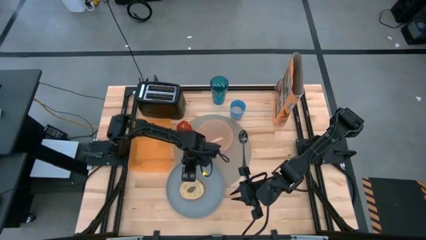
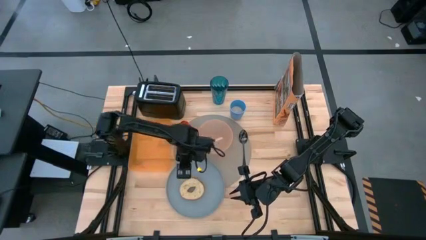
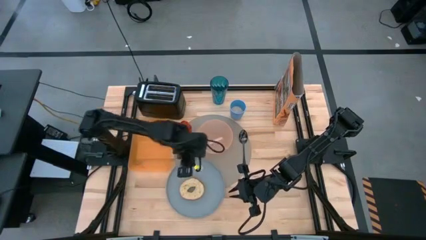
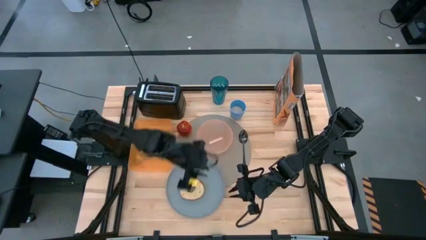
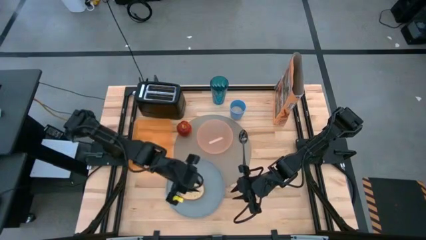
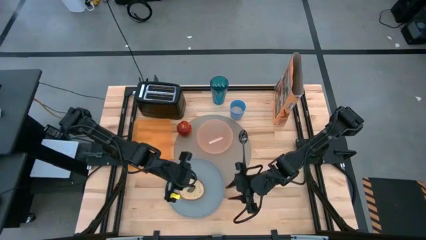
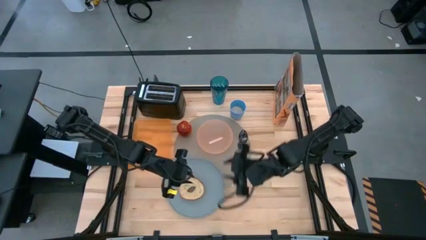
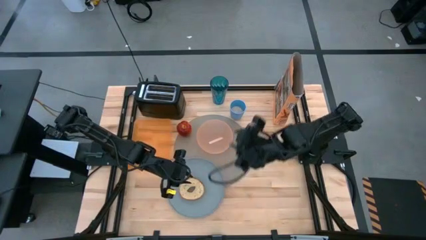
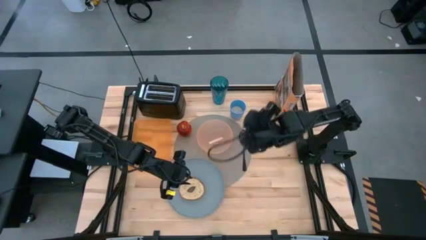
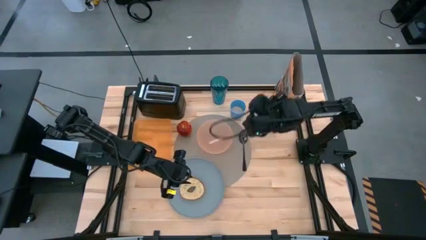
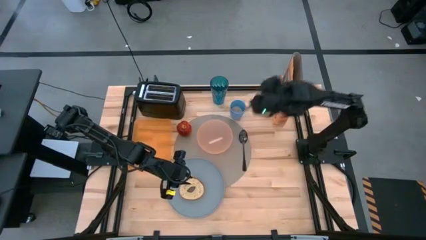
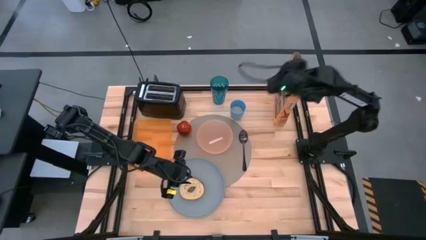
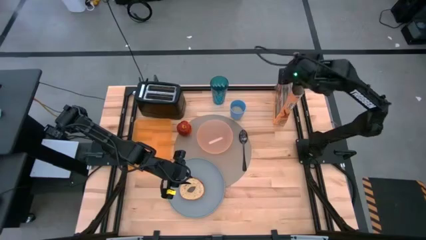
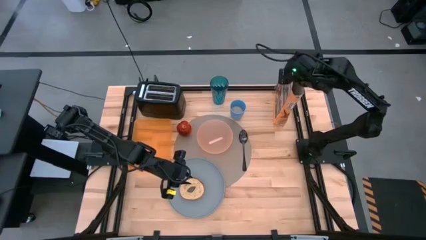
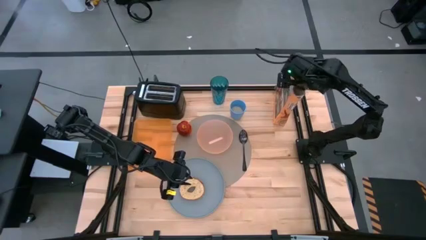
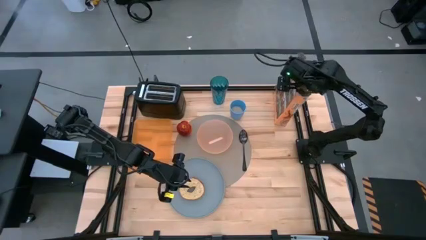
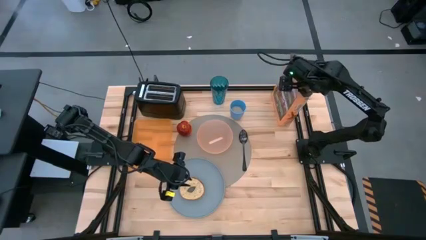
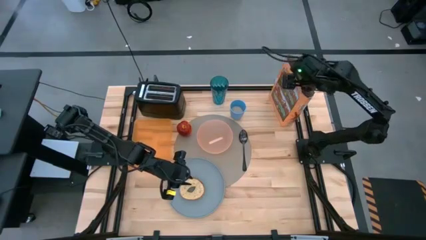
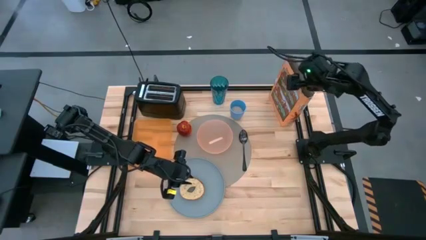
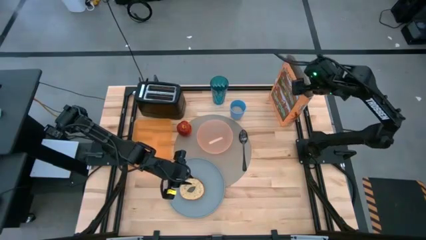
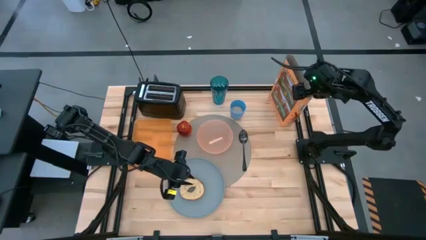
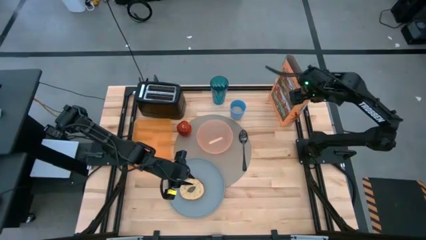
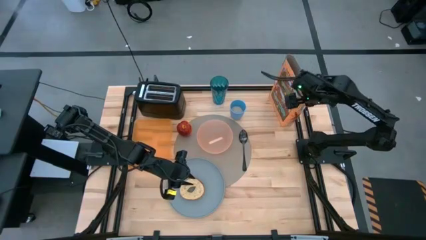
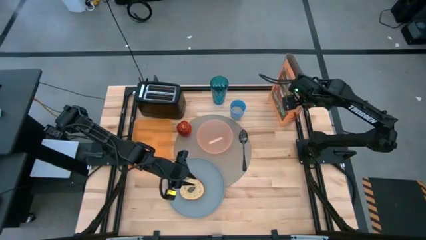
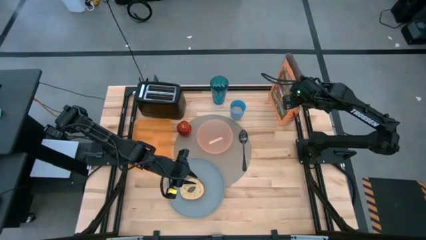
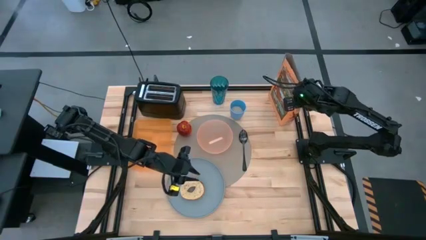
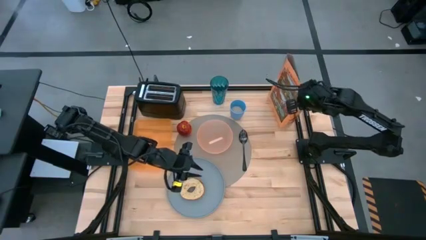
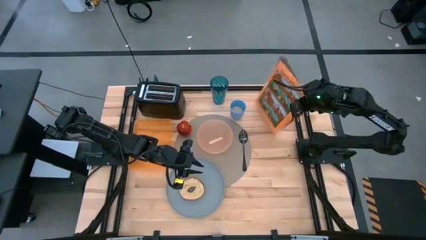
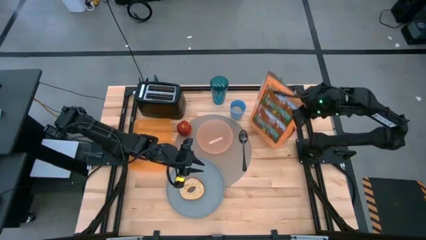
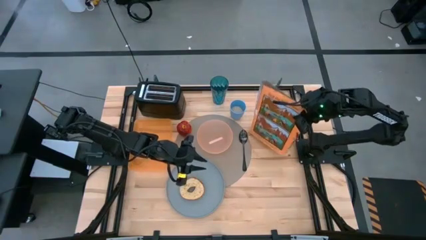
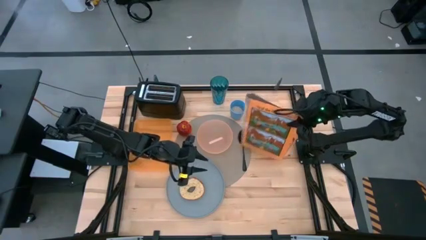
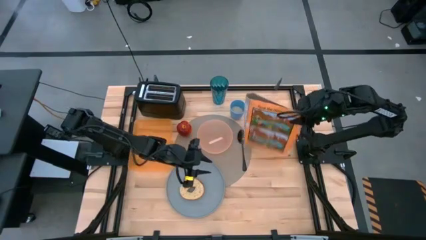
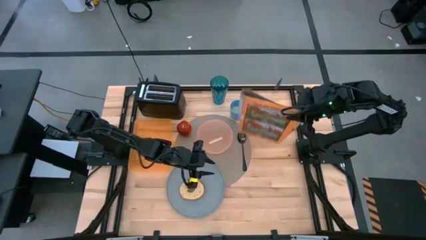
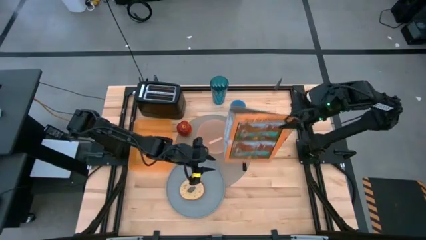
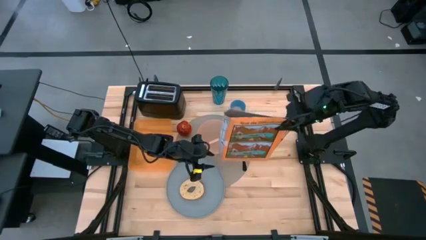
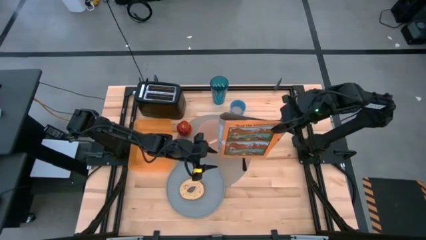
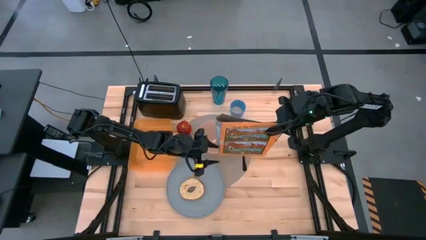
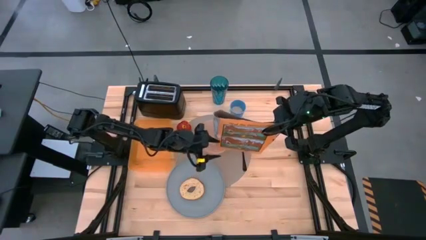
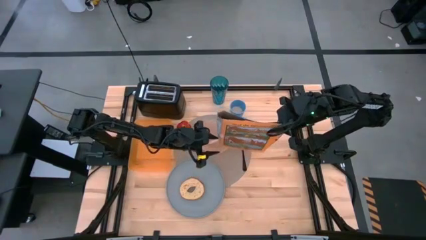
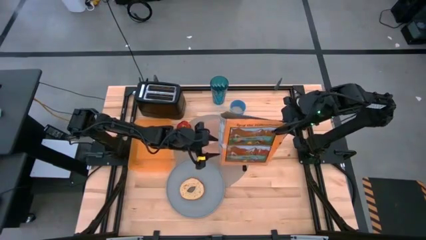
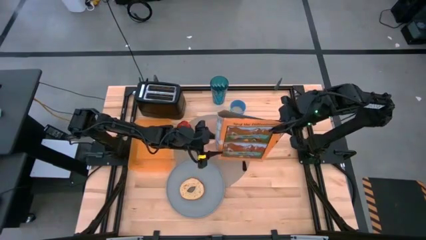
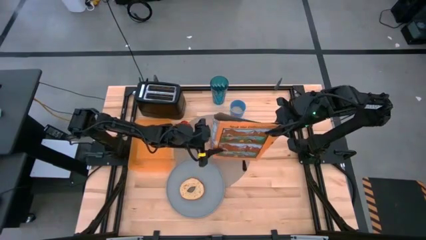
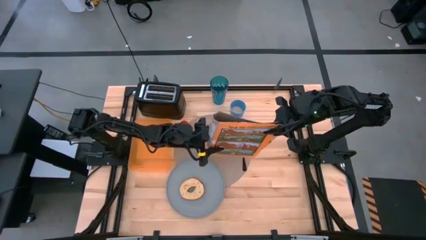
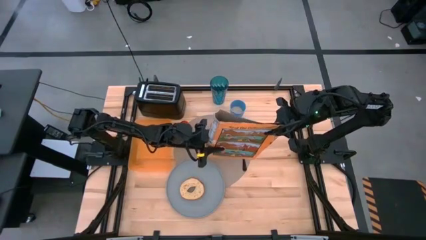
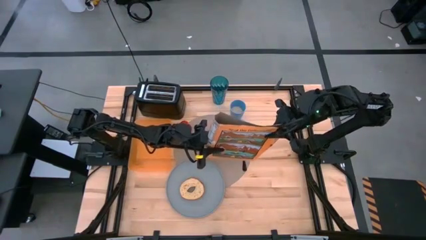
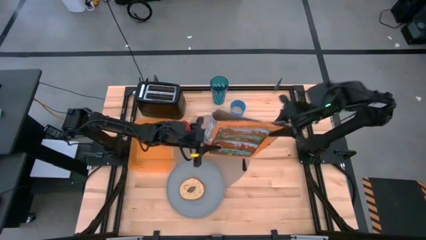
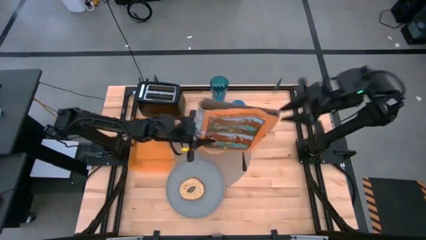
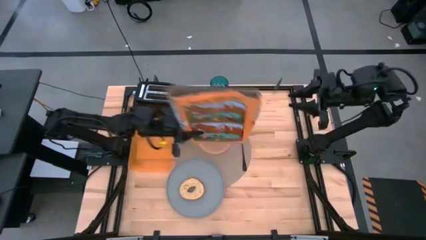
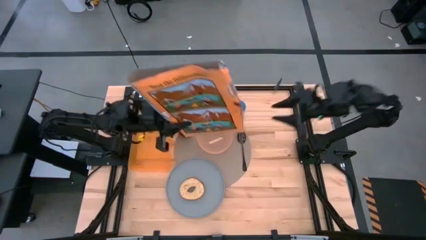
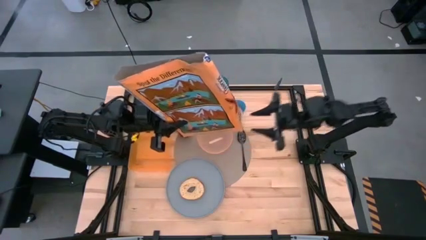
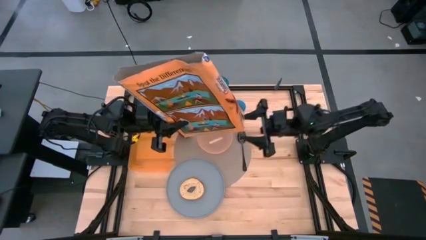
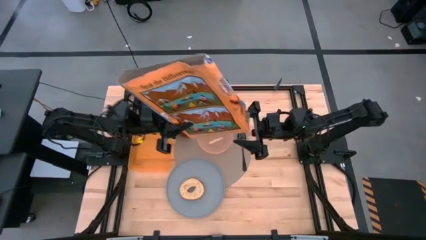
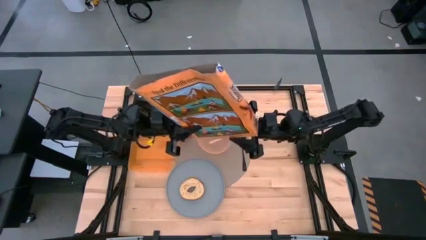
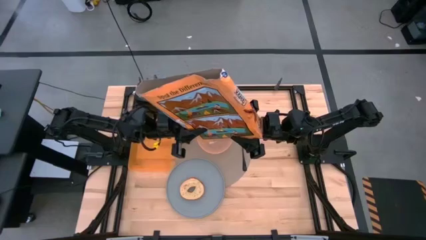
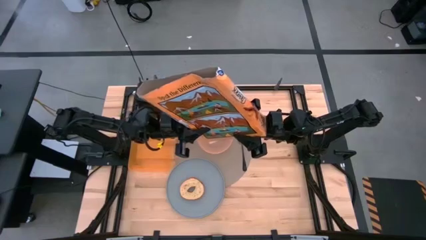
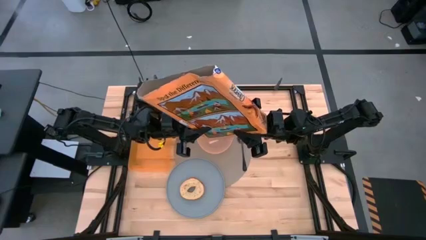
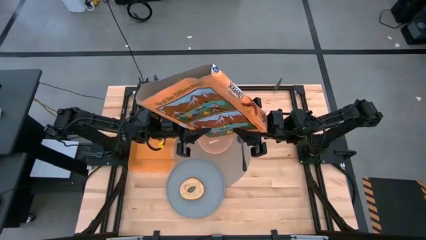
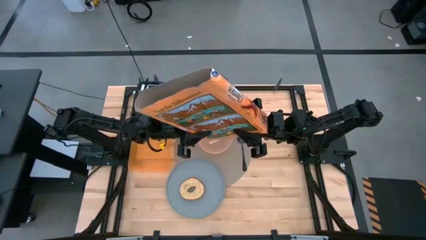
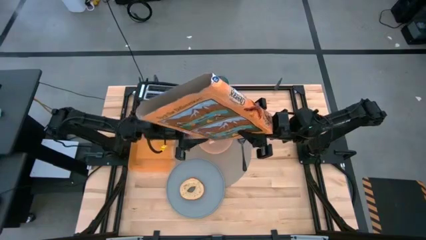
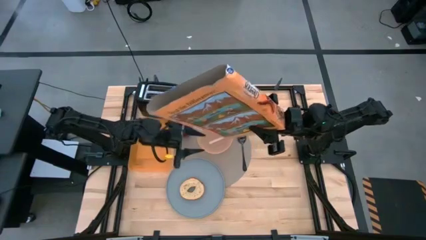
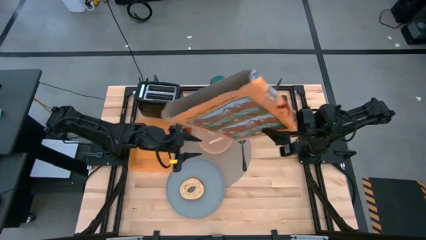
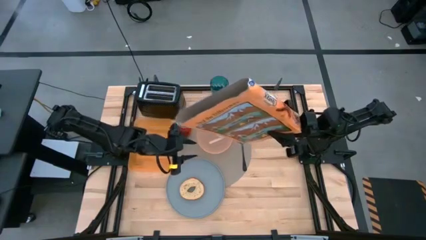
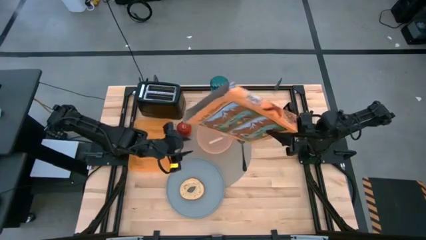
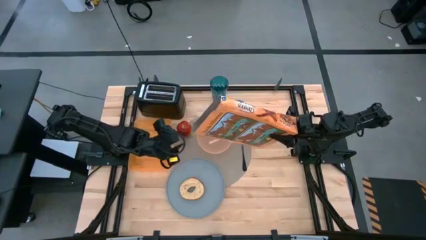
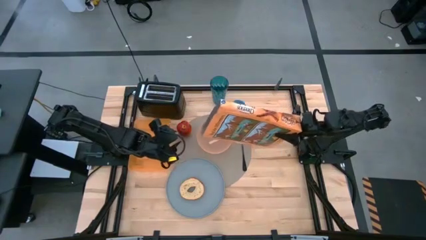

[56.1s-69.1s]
Task: Arrange a breakfast setting
Pour the cereal into the orange bowl

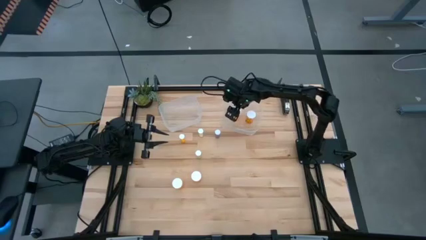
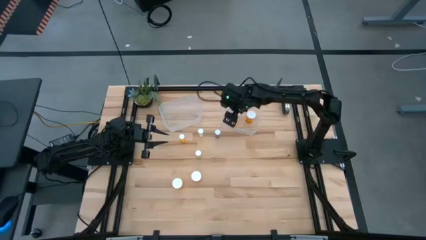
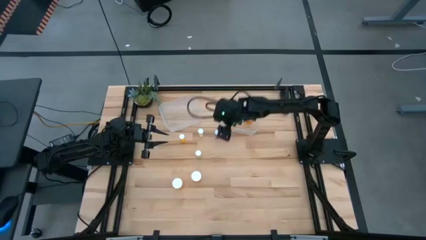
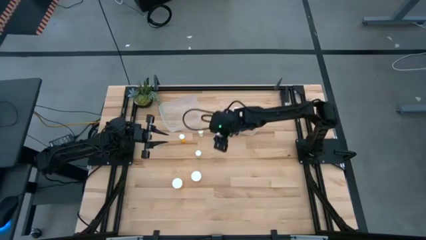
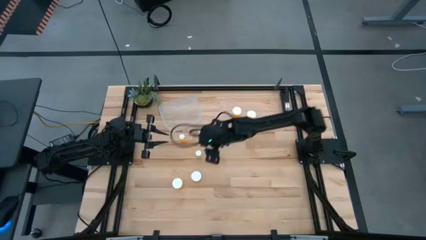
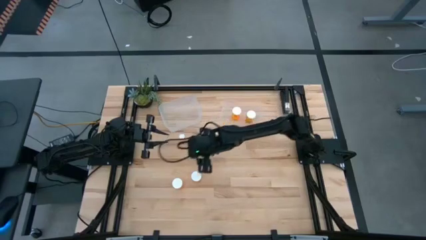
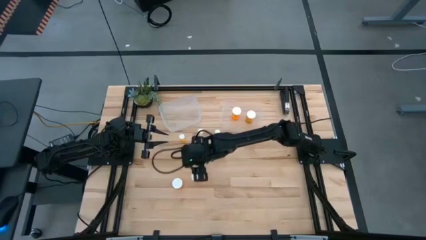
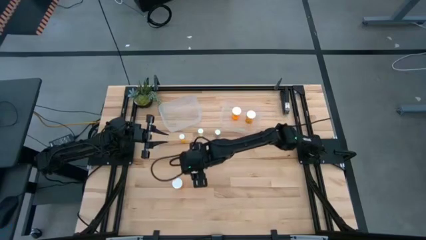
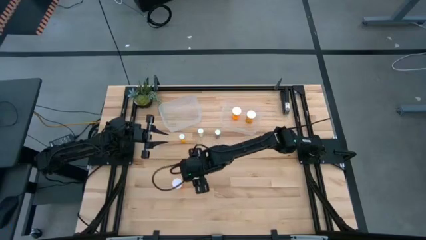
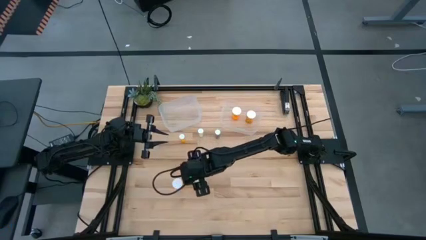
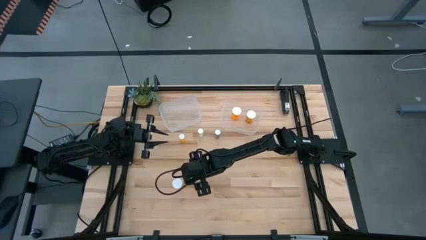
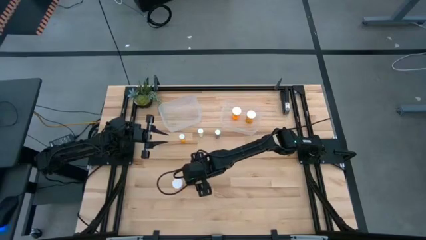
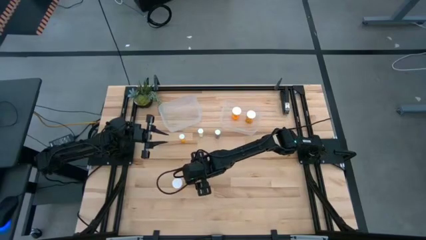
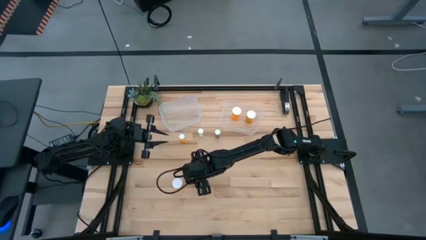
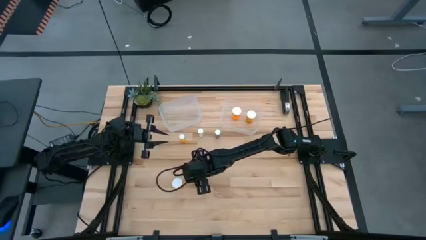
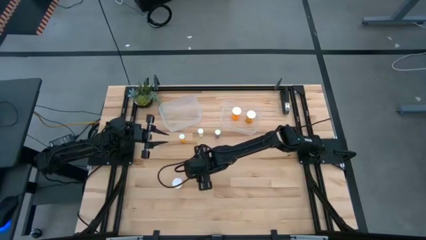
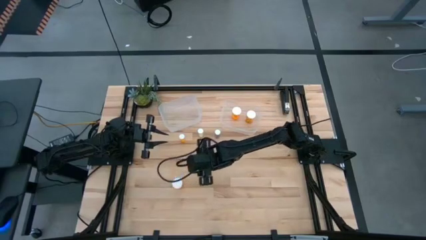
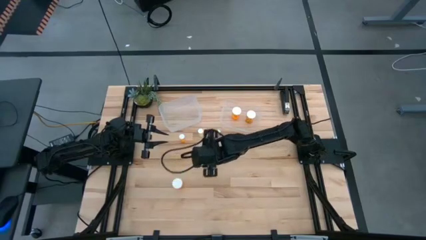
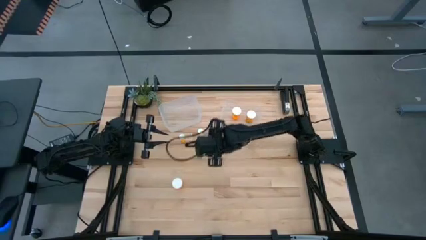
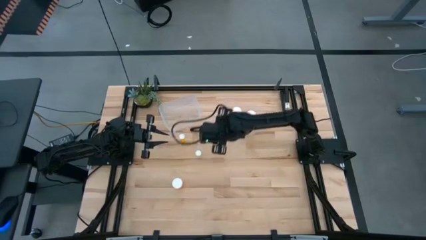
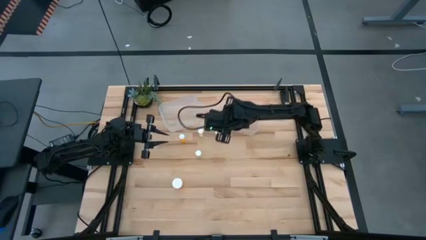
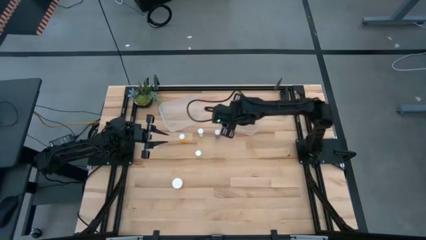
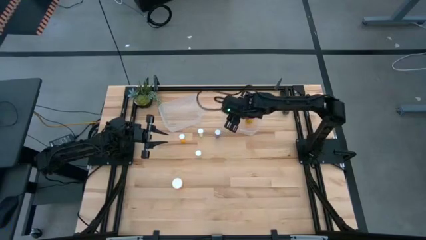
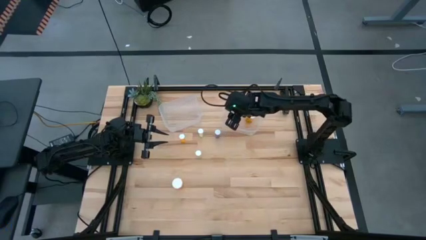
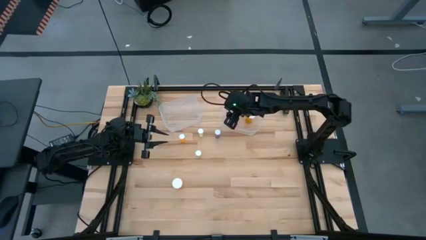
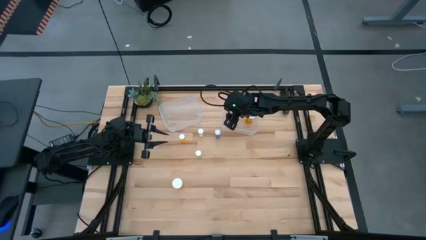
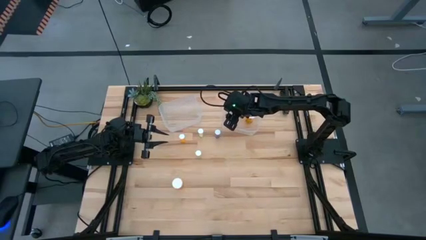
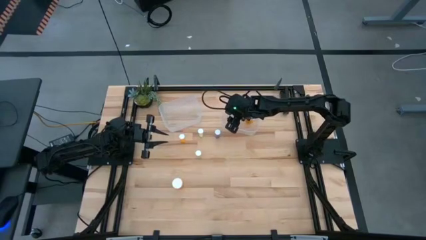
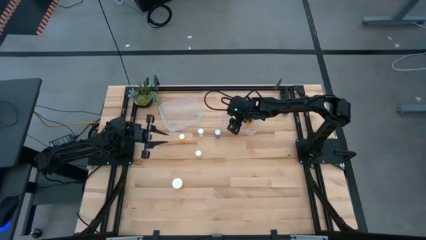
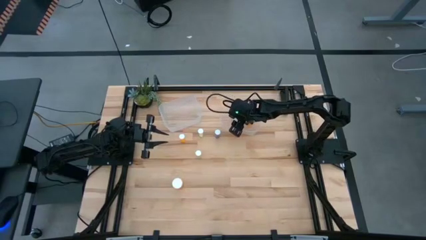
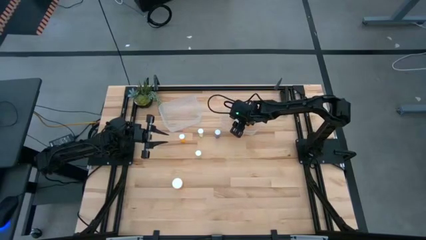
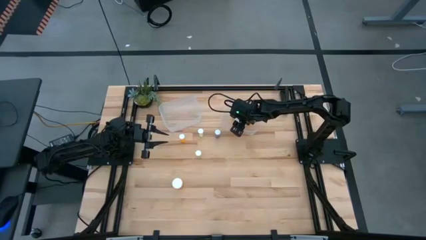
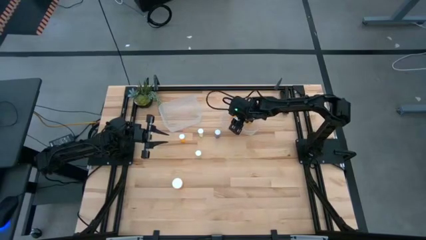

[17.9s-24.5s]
Task: Pick and place medicine bottles into bin by pill shape (circle, oval)
Put the orange pill bottle into the right bin
